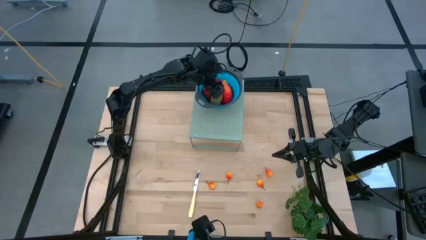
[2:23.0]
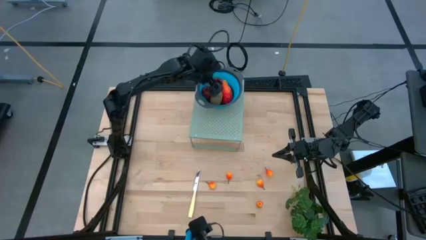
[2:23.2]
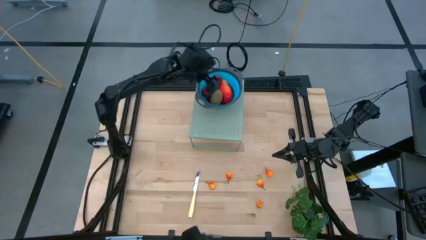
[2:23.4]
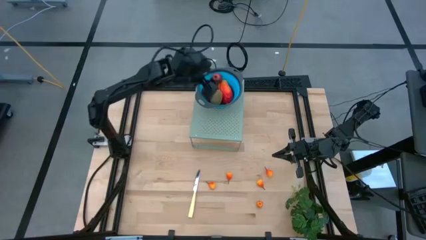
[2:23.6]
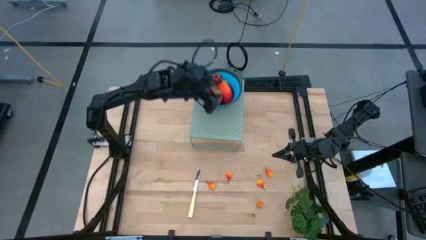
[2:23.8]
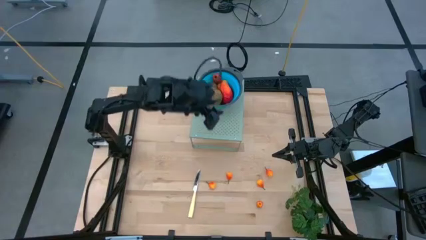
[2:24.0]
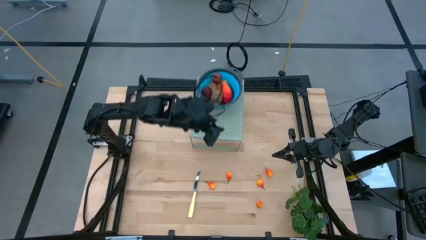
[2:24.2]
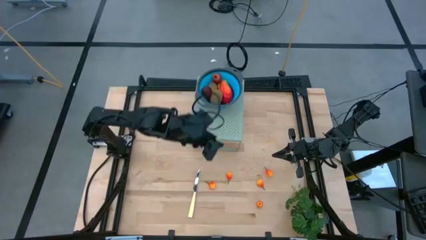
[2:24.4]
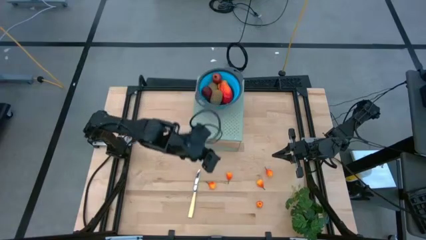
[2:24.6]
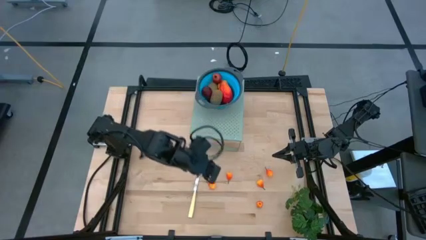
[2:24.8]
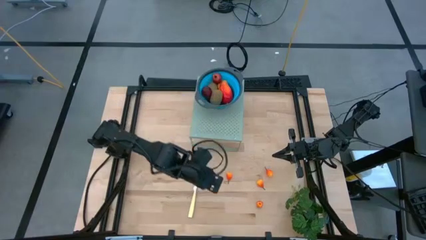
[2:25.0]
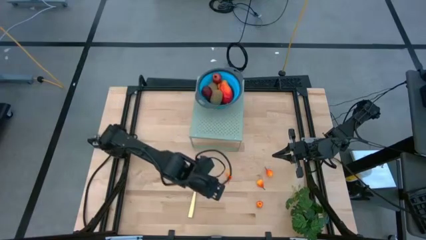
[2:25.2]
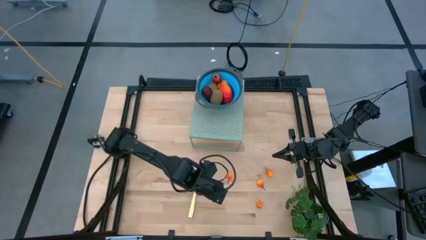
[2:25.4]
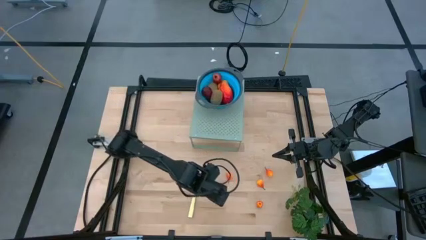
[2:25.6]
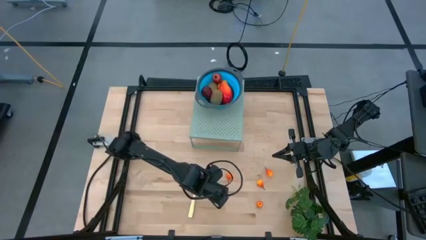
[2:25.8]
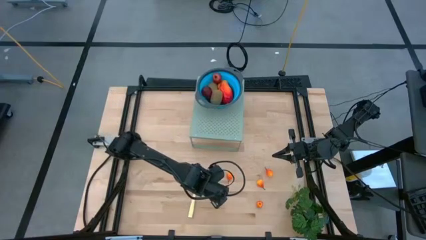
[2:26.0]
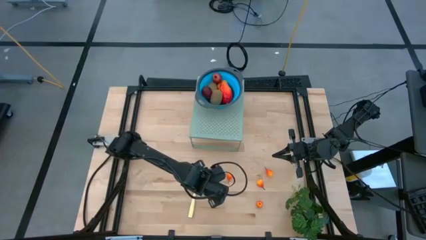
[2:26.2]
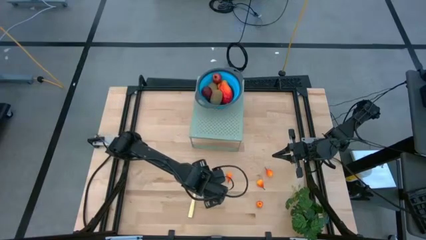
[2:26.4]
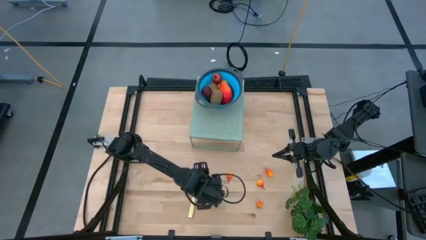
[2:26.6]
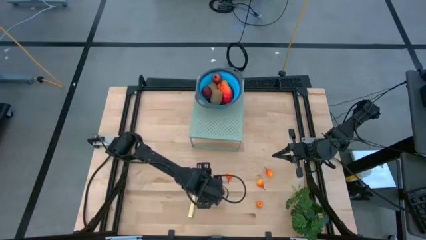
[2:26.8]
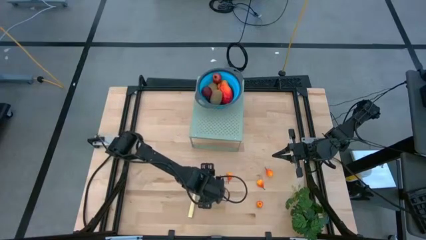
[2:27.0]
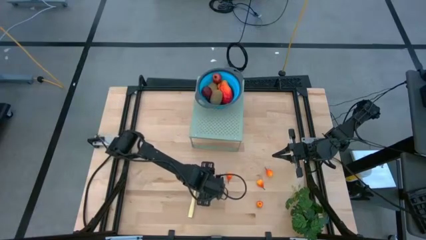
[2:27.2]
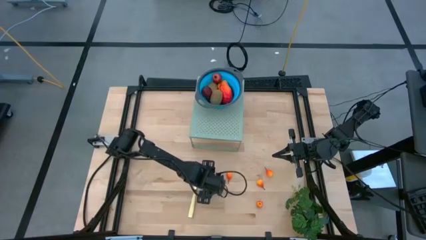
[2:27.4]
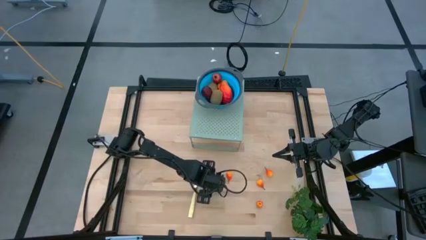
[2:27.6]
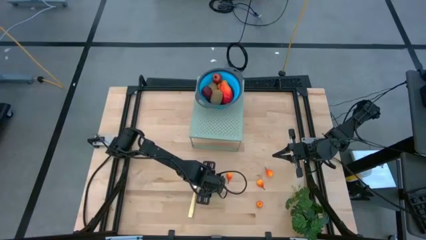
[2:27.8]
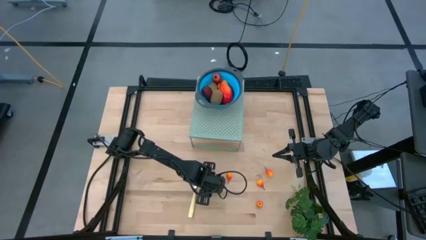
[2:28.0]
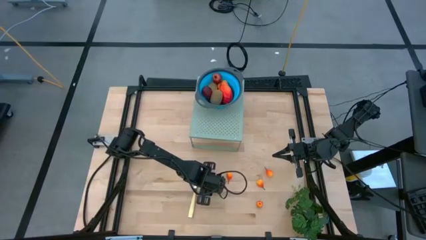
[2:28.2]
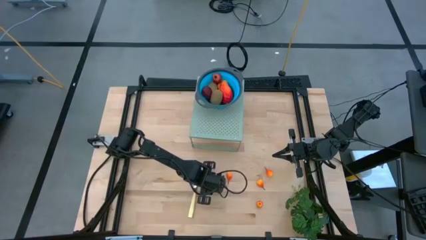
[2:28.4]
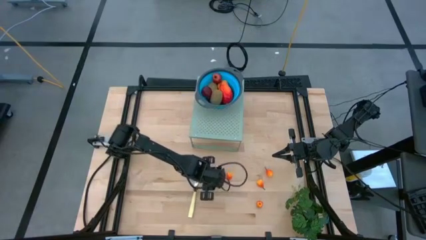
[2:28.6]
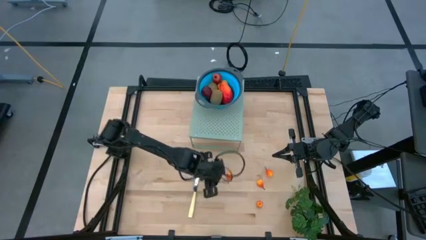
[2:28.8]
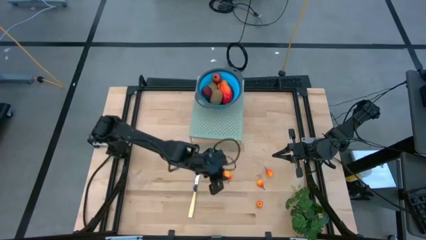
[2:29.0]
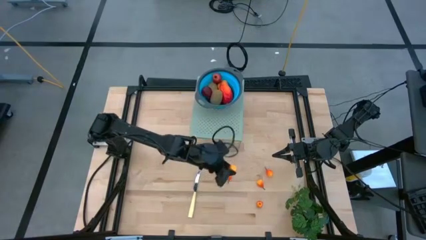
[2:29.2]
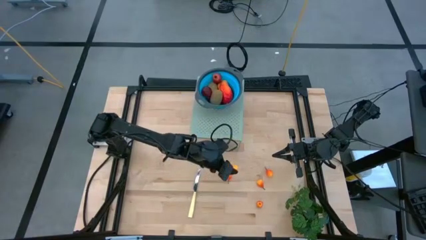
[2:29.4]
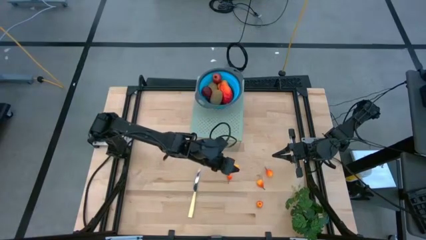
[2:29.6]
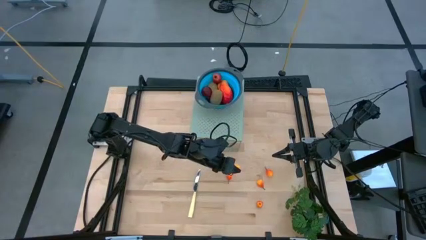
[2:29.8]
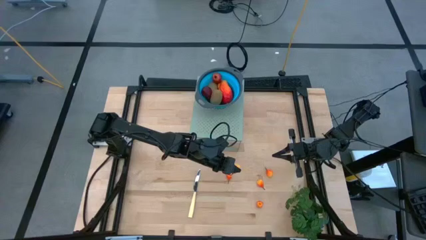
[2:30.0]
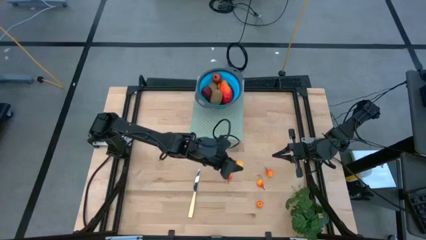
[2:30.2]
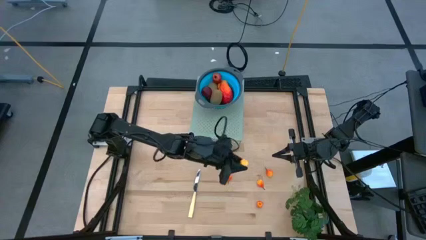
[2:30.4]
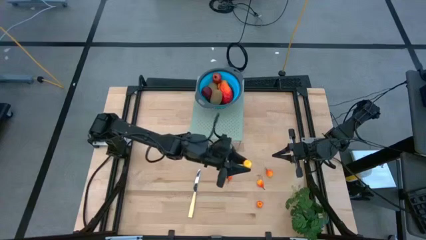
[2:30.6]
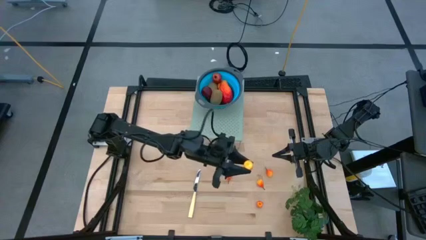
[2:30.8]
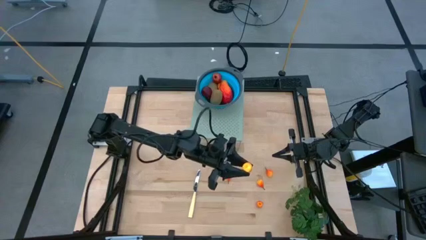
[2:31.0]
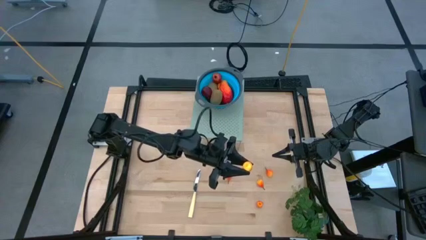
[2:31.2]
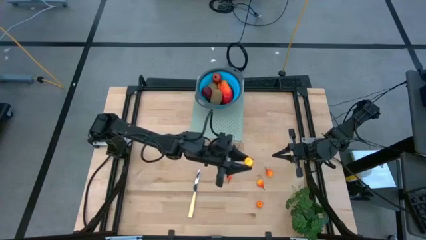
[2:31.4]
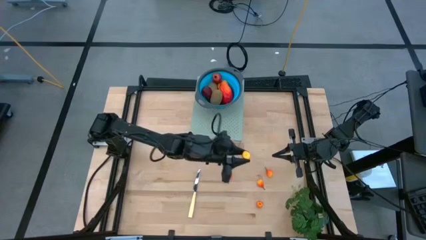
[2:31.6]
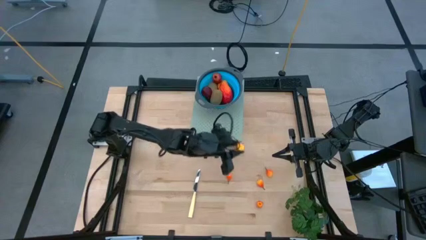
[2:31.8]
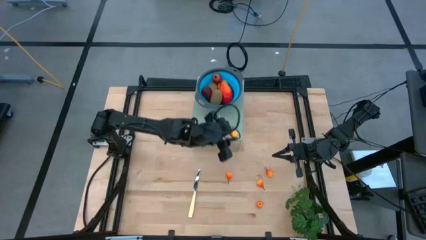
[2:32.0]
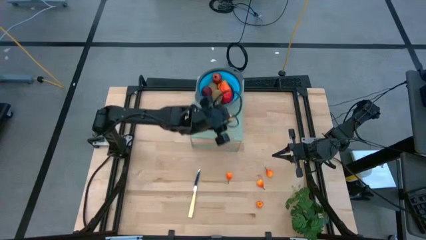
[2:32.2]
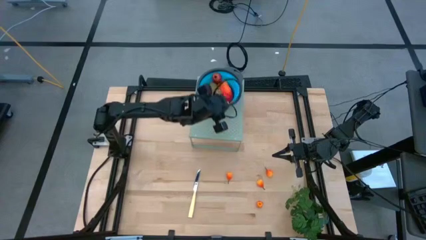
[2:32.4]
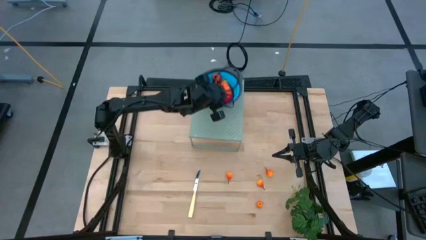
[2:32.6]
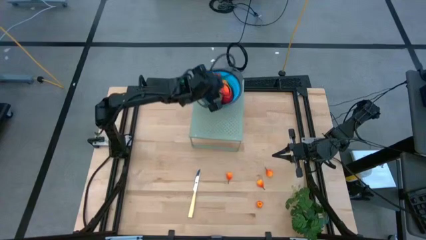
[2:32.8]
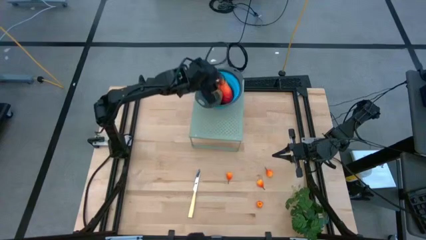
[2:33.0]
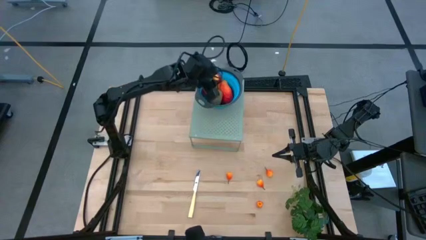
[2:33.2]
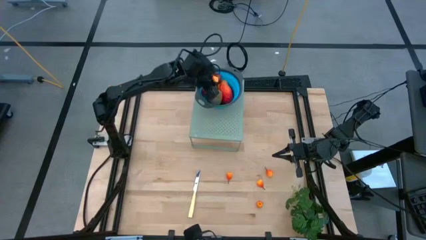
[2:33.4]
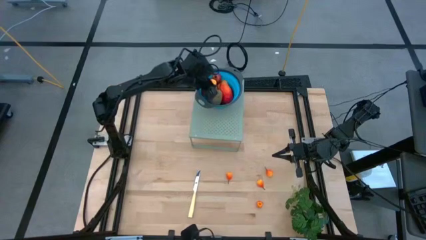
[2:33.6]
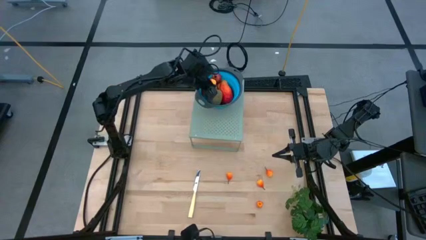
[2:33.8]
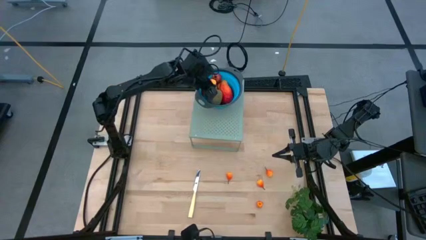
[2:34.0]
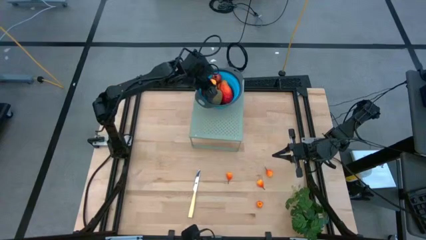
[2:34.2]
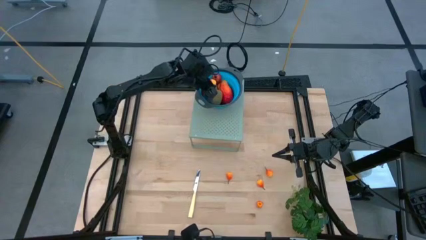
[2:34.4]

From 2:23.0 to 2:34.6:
Task: Pick & Place Fruit
Put the peach into the blue strainer bowl on the shelf
